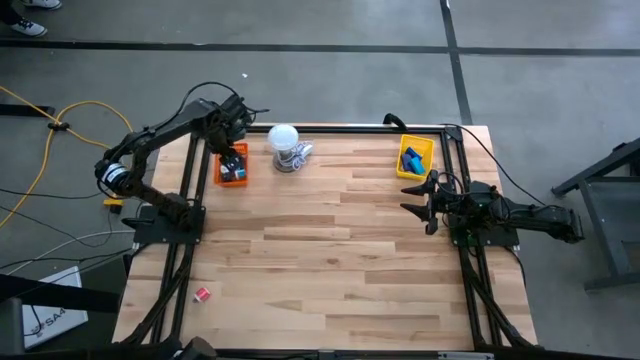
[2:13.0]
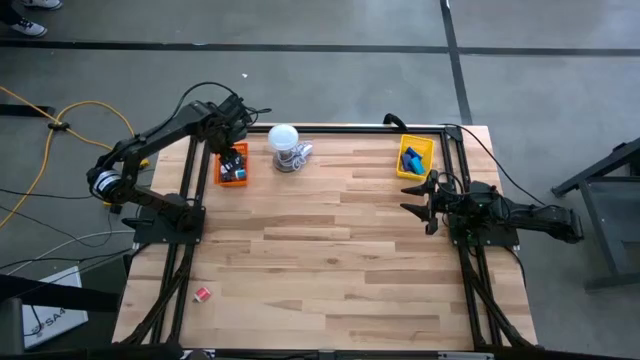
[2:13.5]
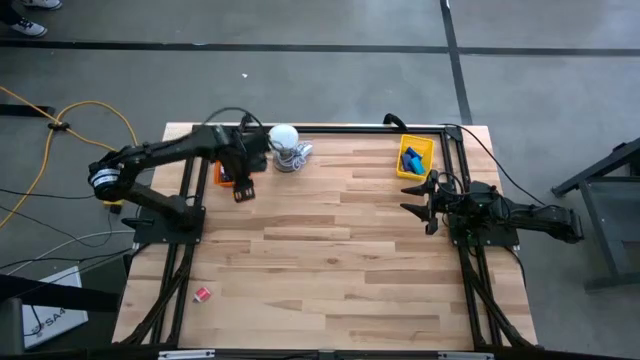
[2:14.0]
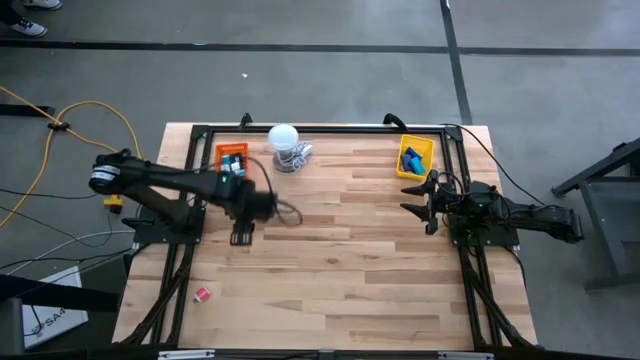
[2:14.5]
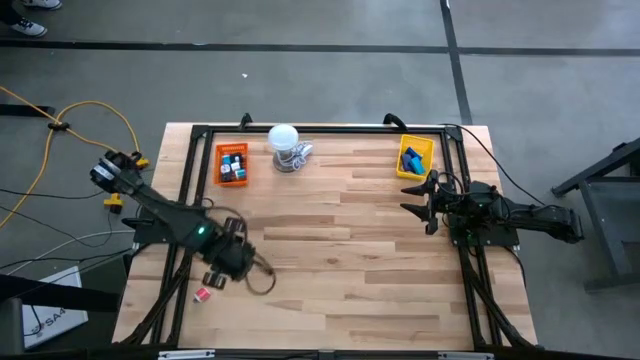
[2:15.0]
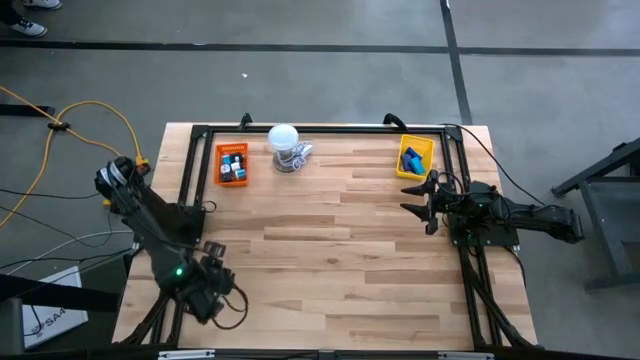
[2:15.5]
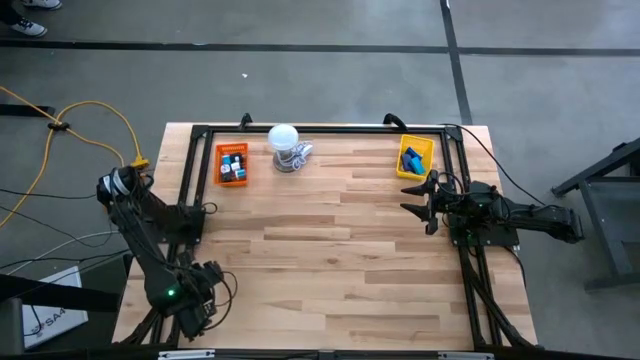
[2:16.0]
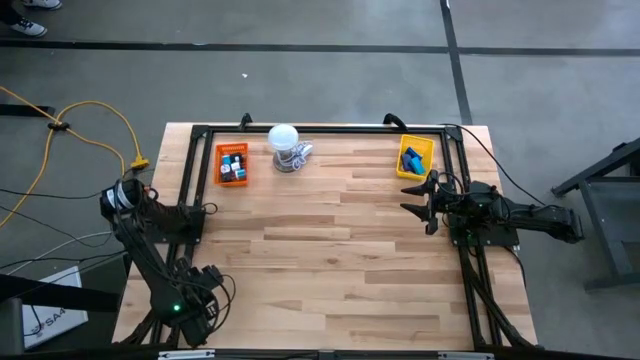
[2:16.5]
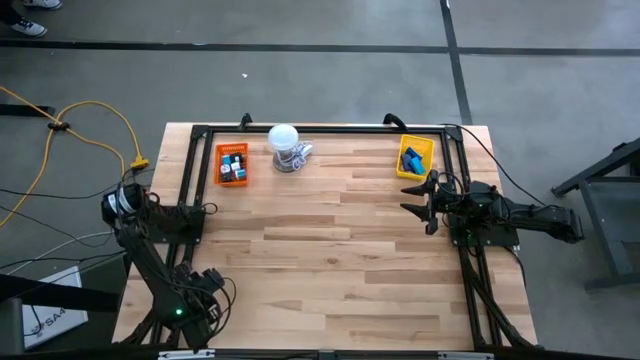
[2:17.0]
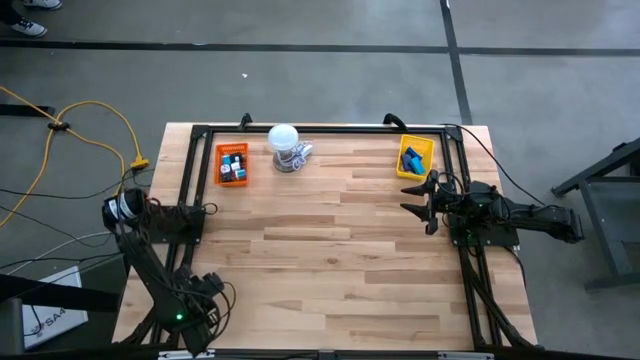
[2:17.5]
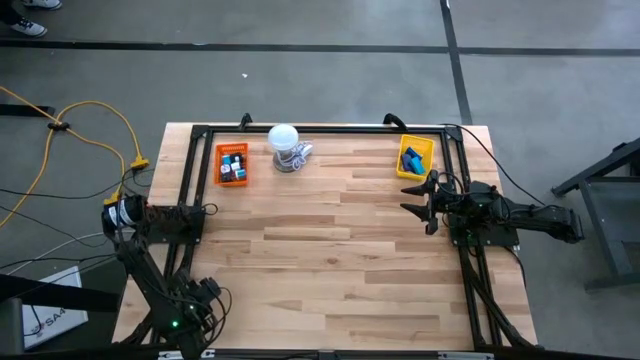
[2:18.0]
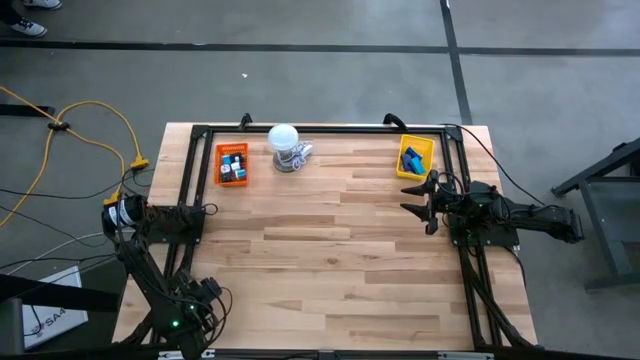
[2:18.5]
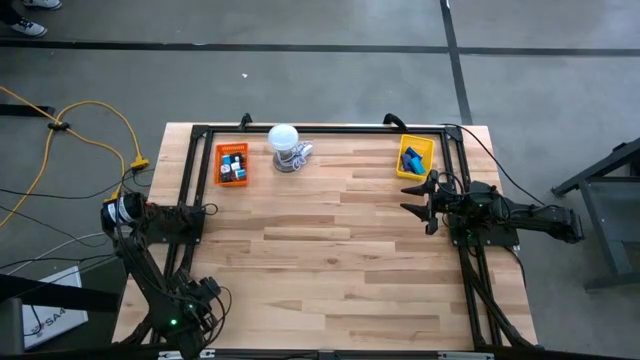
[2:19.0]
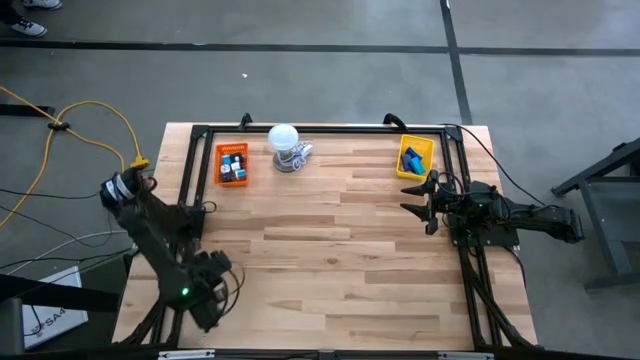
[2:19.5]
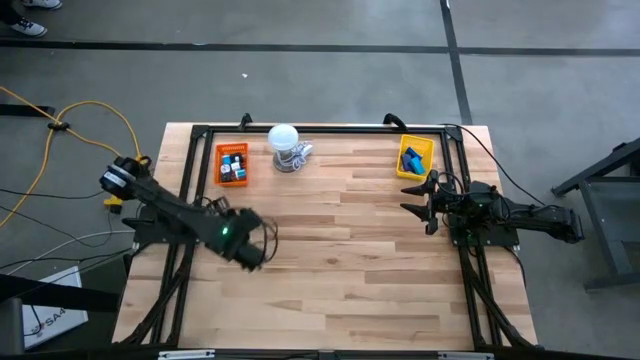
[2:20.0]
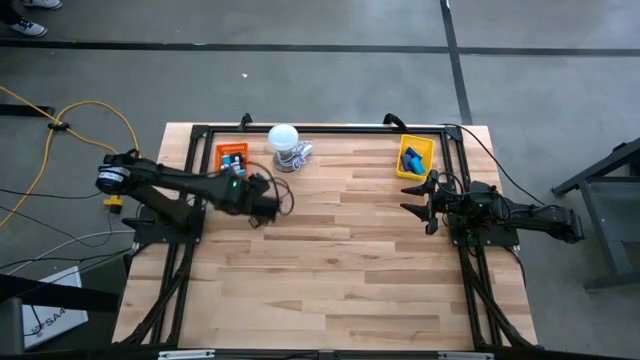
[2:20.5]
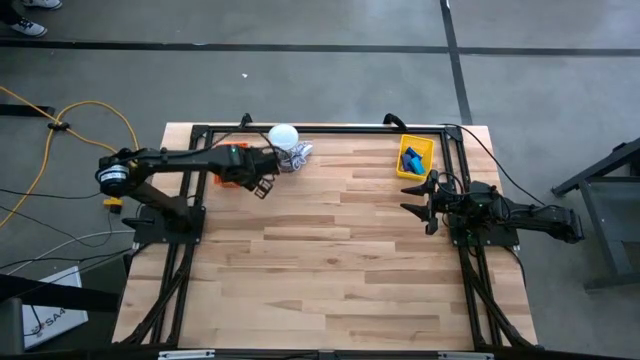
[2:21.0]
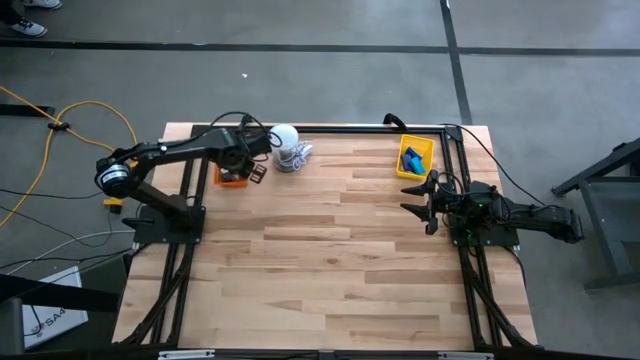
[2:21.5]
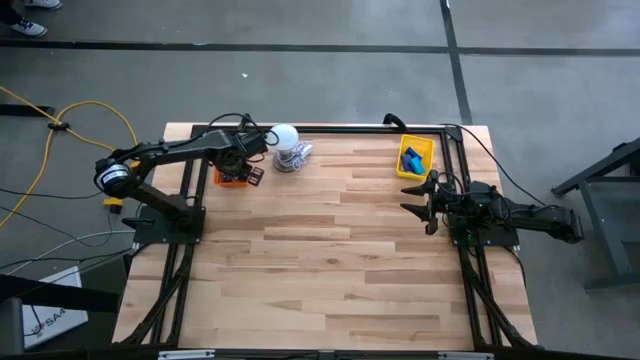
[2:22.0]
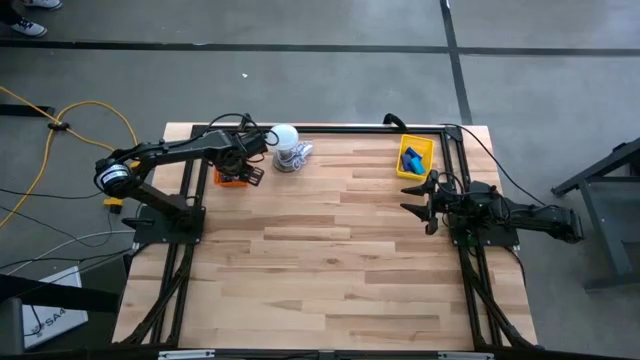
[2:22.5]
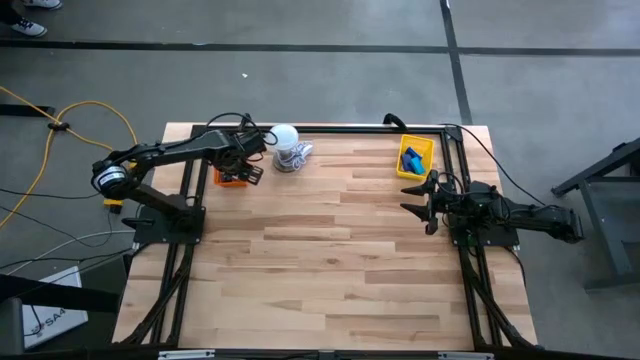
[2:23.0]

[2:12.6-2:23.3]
Task: Pick & Place Office items
Put the pink charger adapter into the orange basket

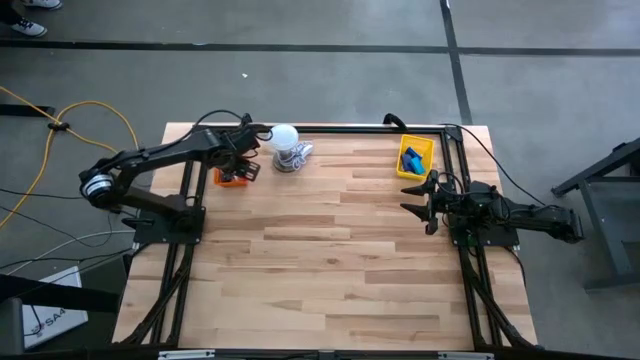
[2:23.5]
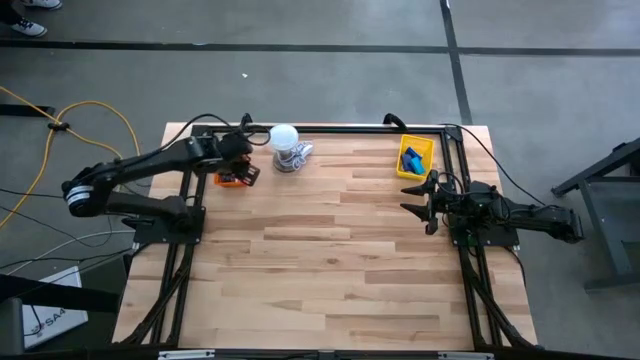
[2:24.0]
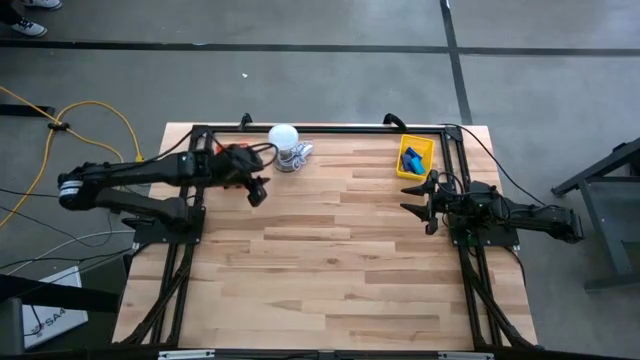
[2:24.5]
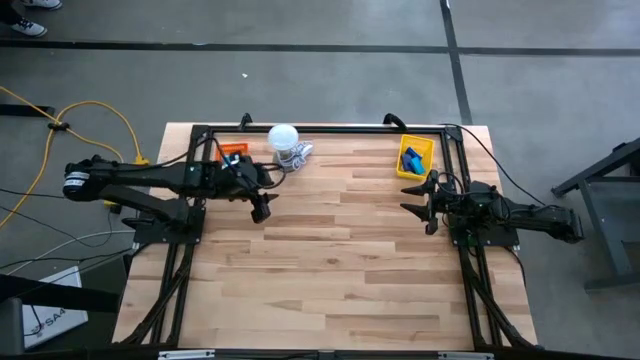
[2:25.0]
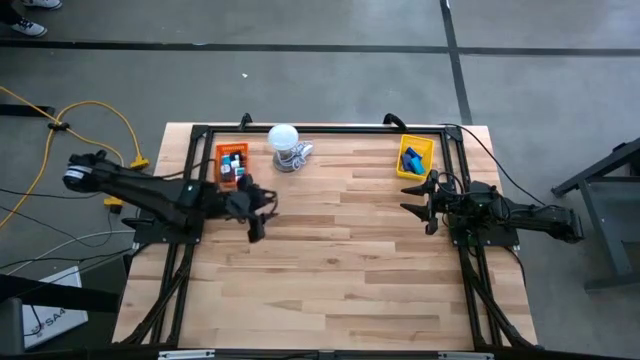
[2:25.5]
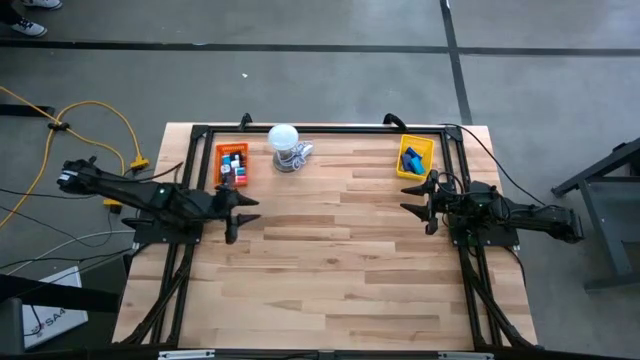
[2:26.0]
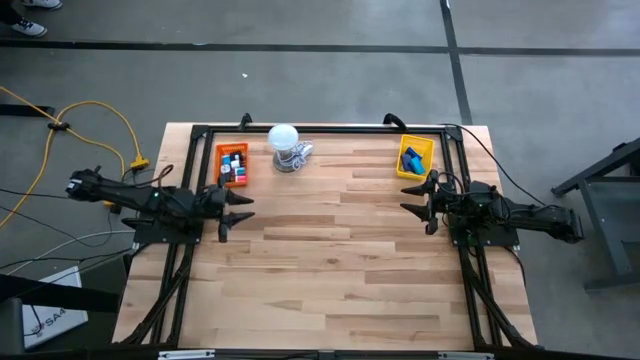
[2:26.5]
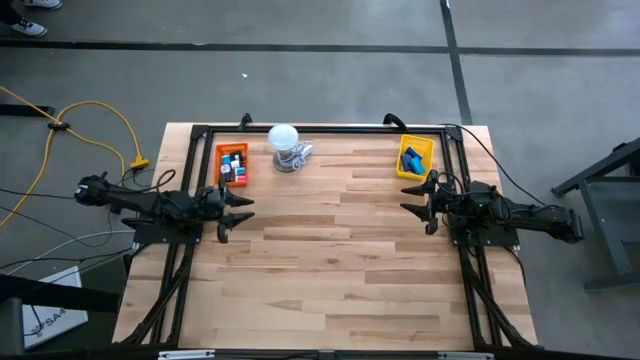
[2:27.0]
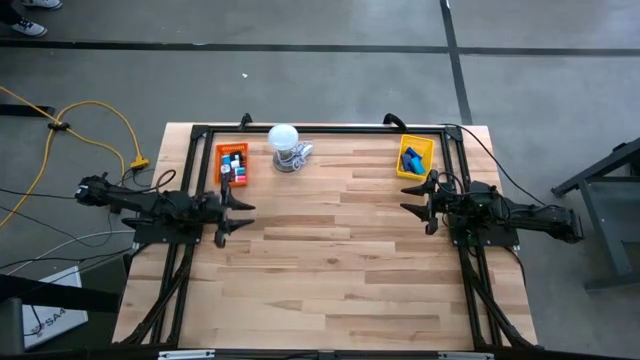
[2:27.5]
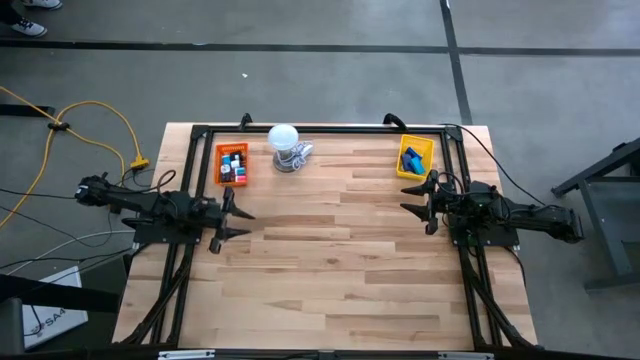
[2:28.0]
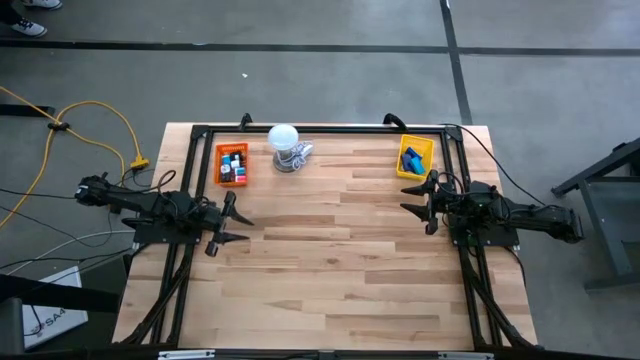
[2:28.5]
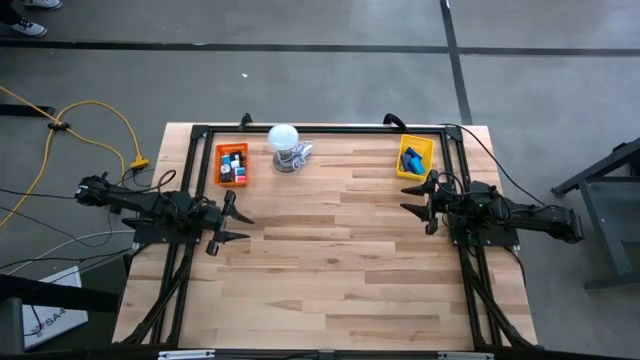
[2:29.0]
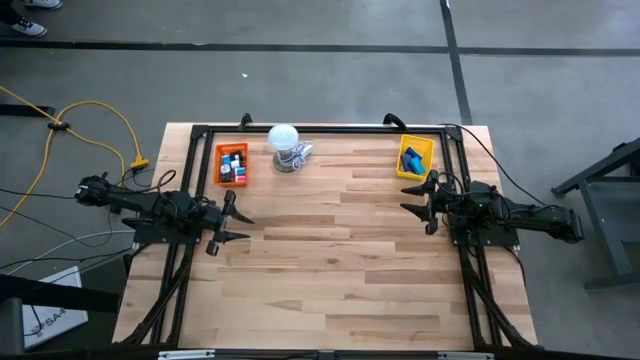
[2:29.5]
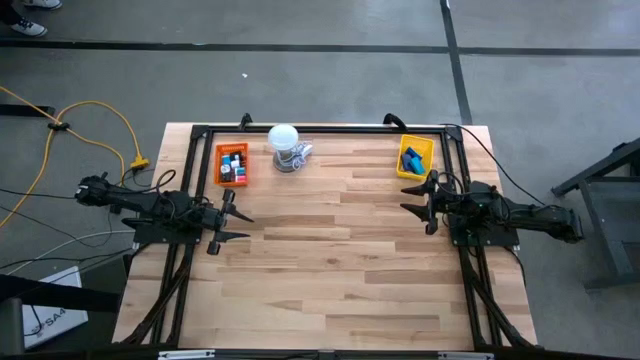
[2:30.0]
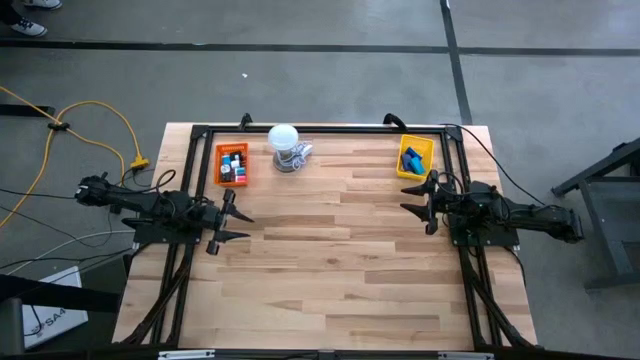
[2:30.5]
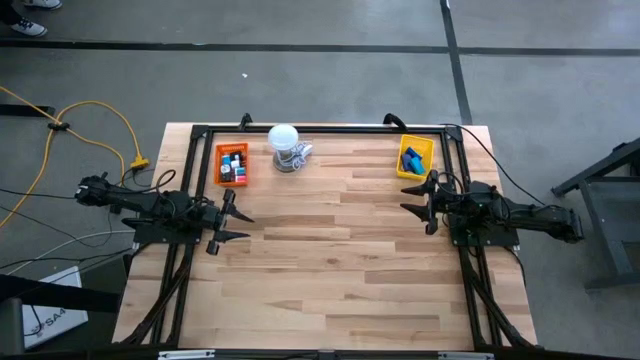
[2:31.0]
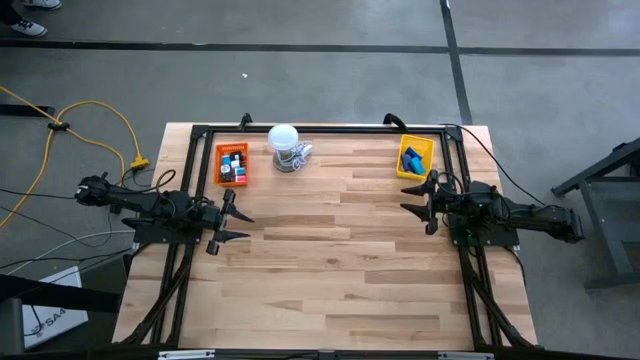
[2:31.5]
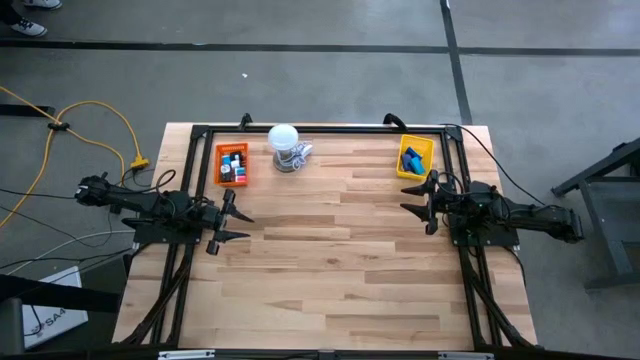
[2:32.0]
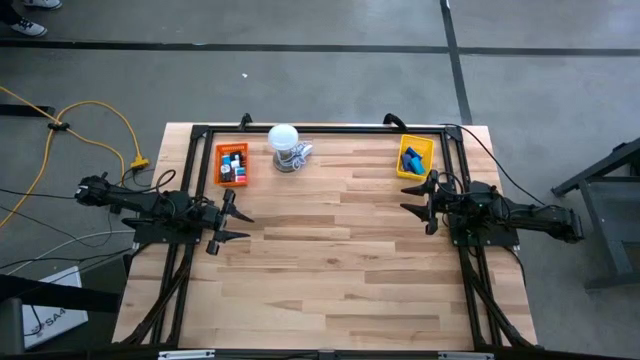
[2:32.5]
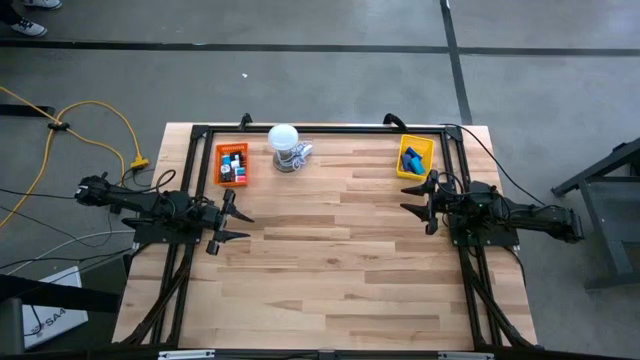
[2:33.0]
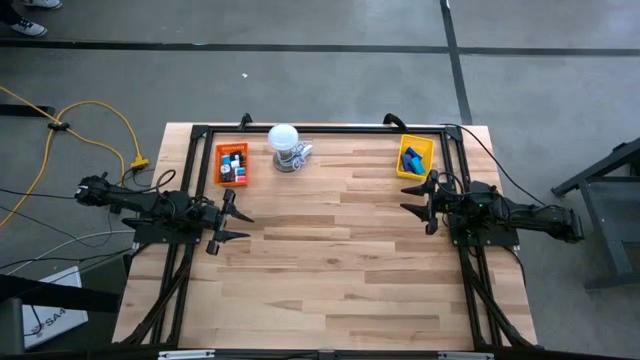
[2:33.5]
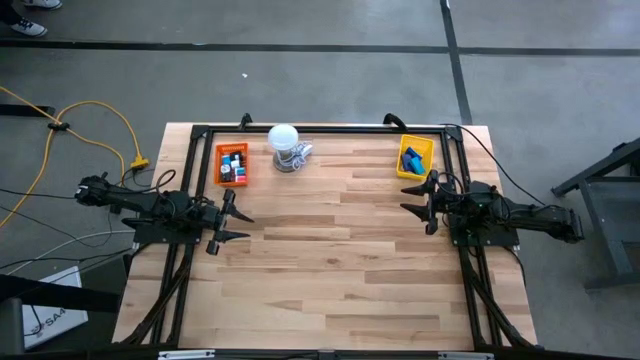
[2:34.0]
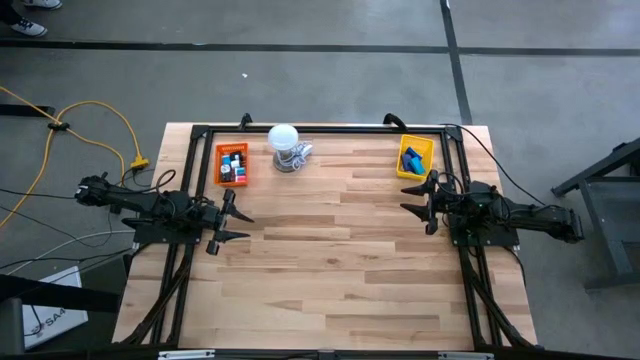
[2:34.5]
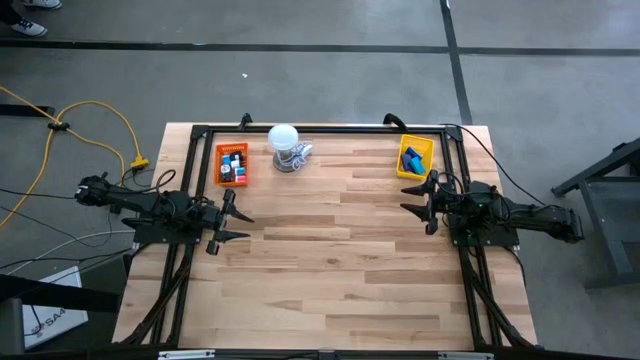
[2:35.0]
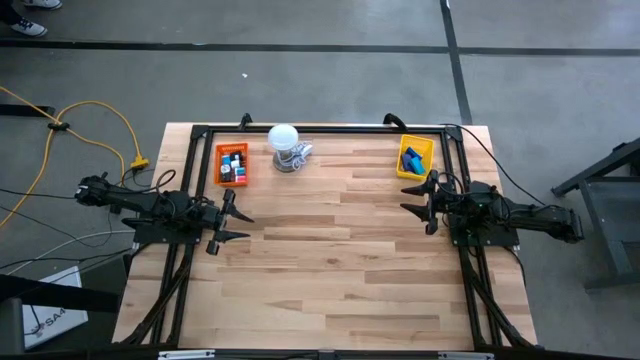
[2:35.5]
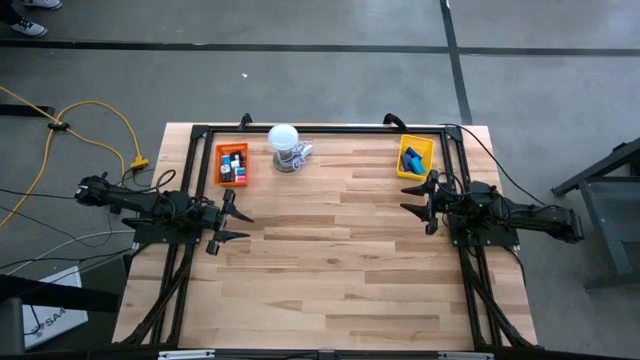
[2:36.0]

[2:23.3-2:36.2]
Return to Home Position
